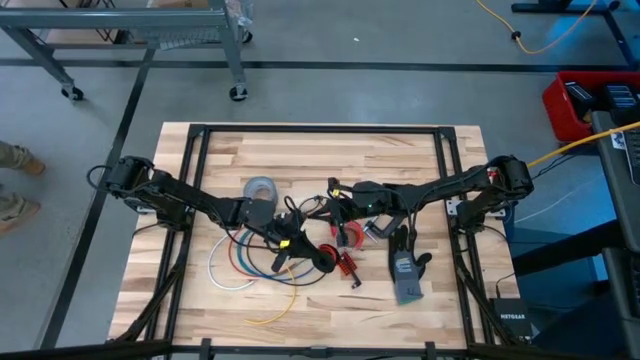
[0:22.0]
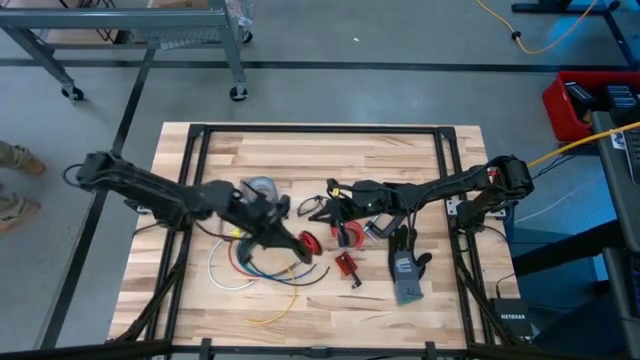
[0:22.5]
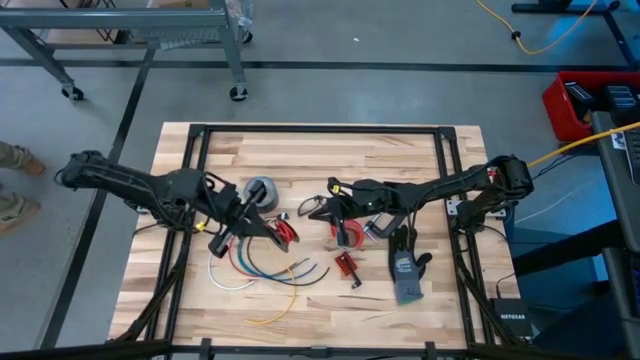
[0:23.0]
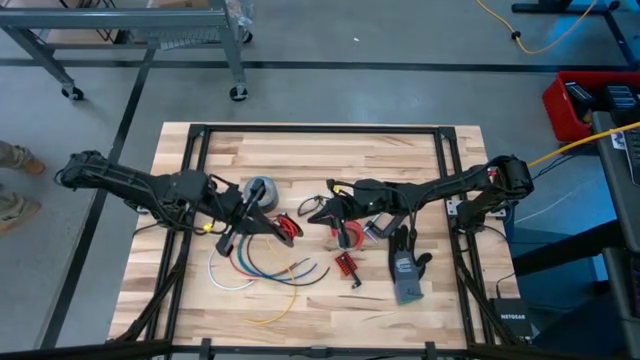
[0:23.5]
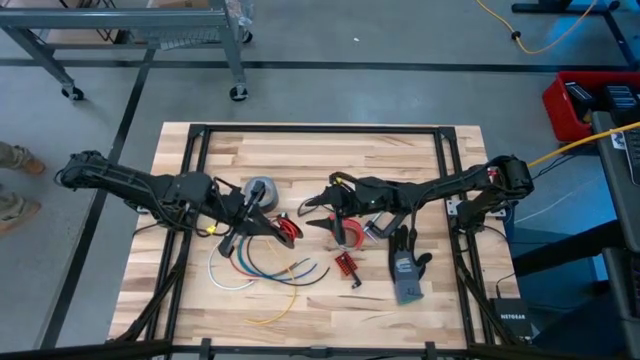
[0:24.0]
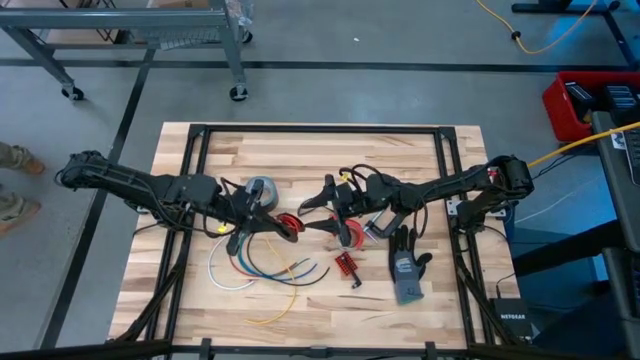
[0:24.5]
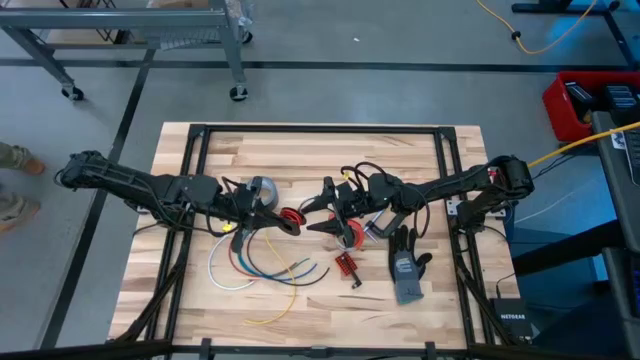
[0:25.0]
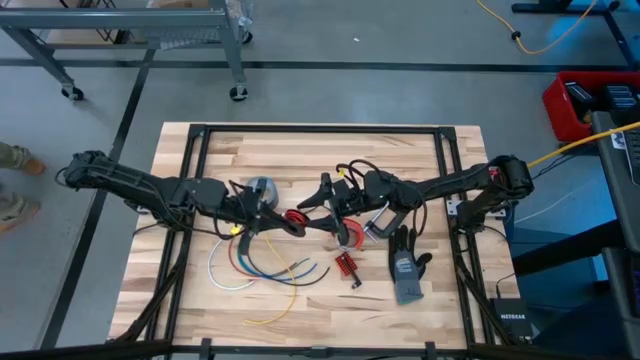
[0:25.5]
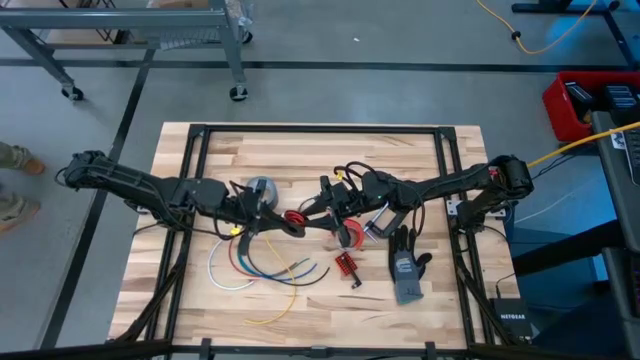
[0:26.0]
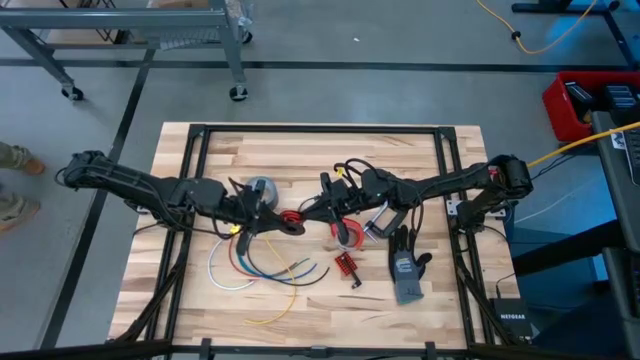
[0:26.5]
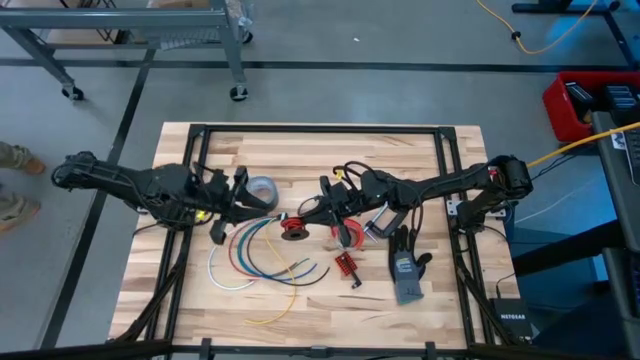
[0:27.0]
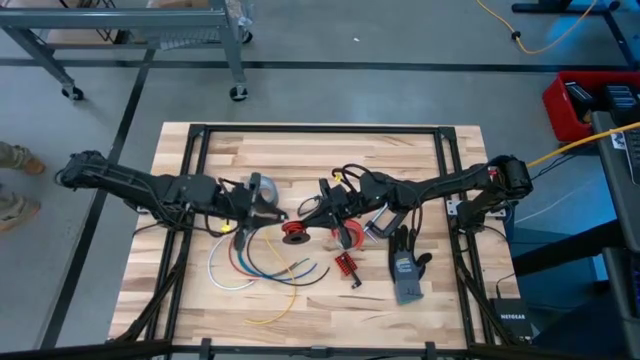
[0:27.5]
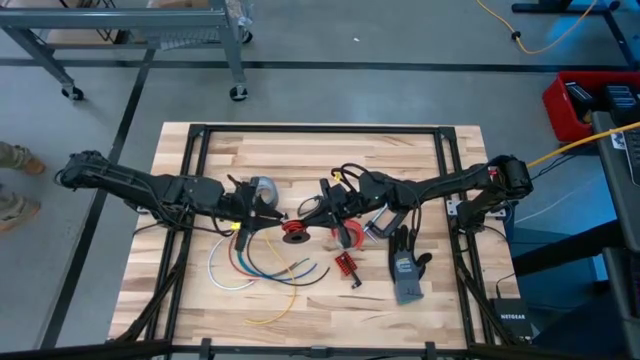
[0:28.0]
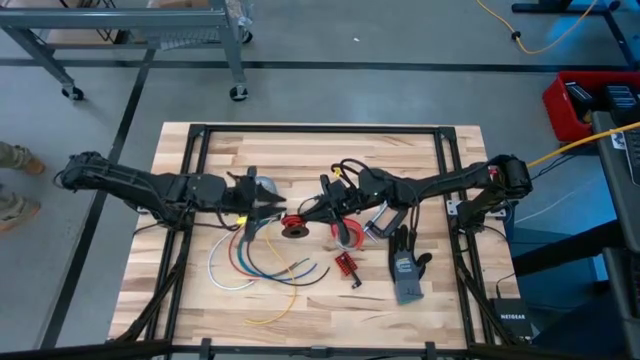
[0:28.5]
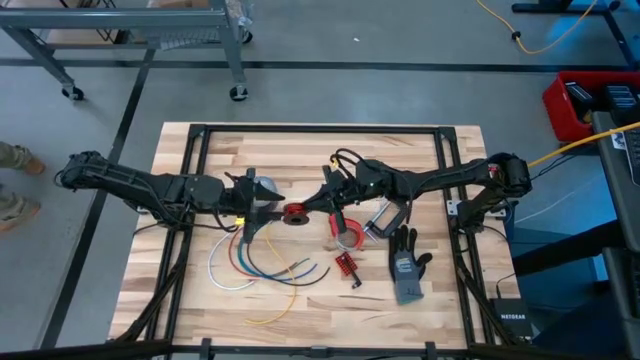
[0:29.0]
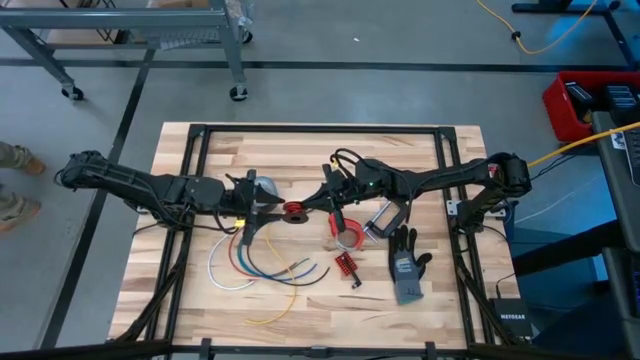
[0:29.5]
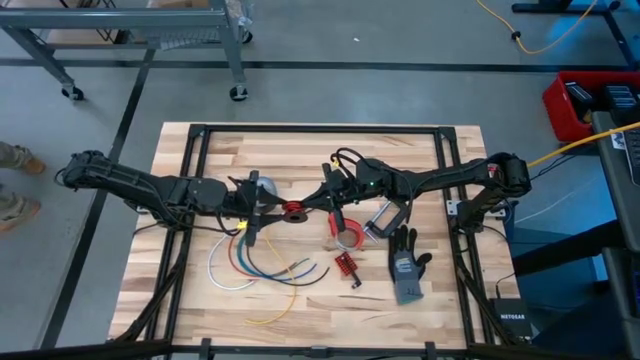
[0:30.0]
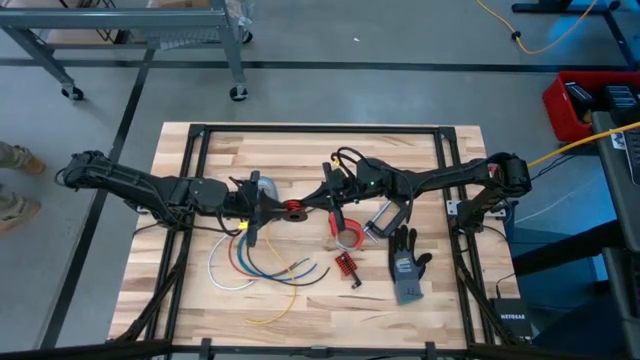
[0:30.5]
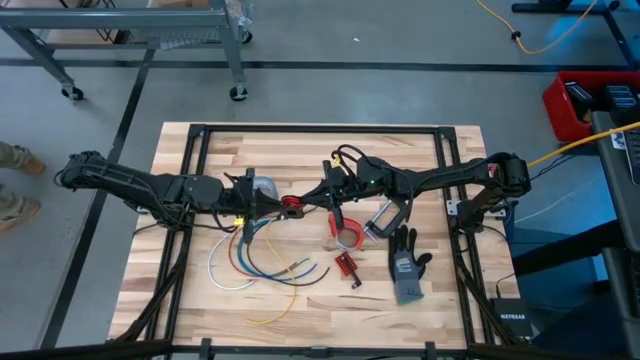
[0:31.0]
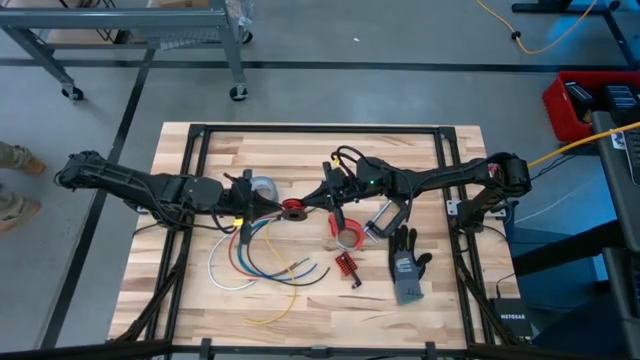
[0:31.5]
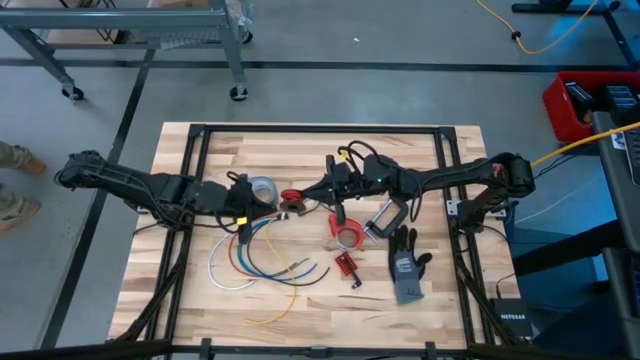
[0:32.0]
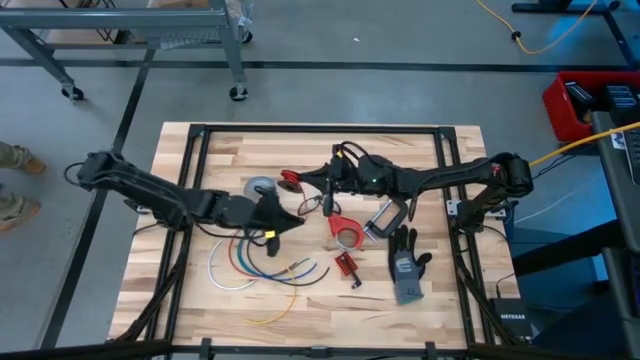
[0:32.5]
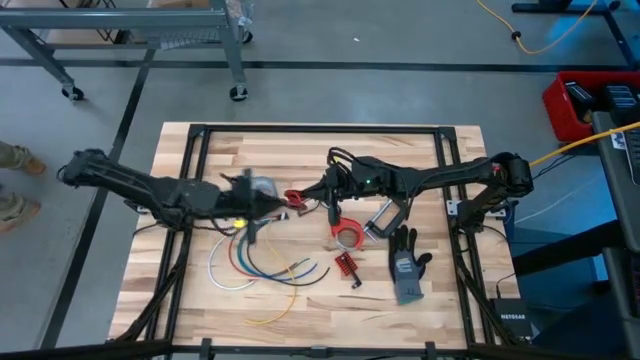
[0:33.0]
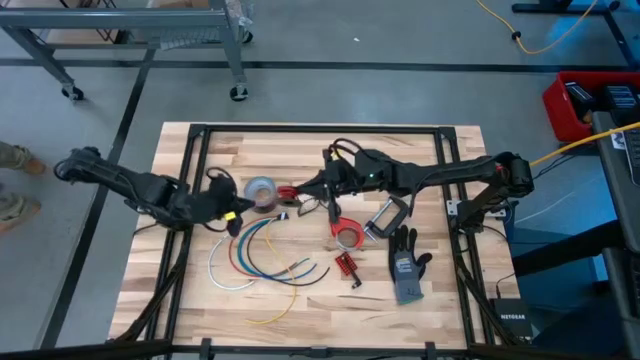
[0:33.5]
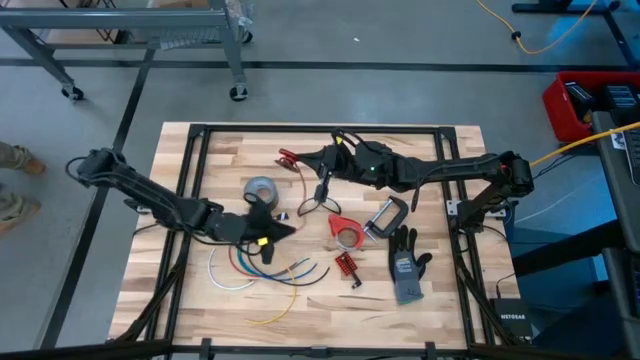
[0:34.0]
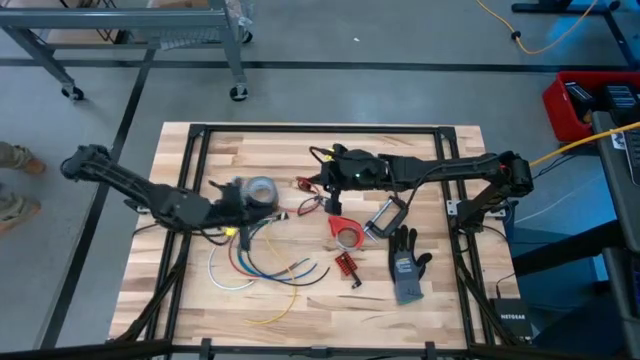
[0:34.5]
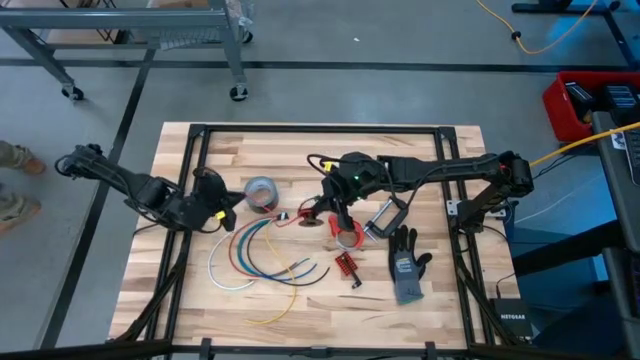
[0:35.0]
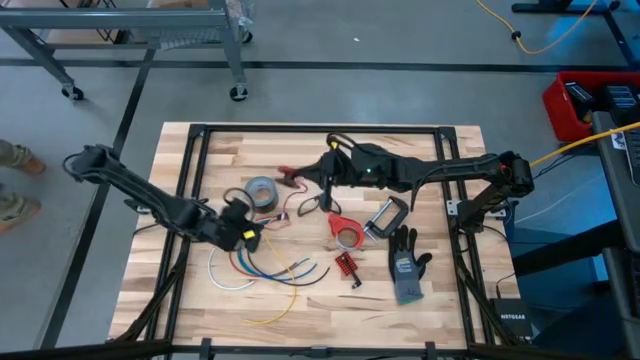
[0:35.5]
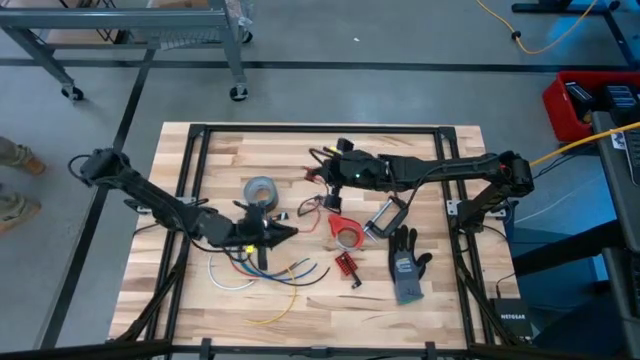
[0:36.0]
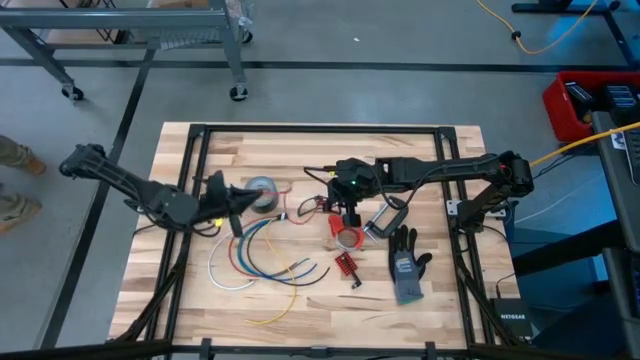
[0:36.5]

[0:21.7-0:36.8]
Task: Coil cords
Uncoil the red wire from the spool

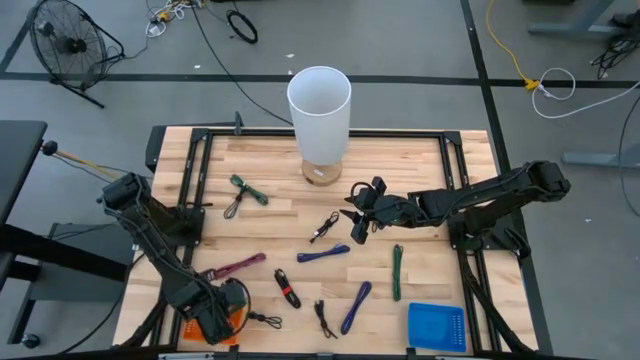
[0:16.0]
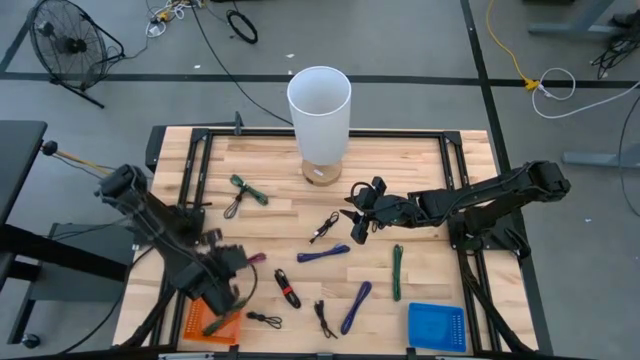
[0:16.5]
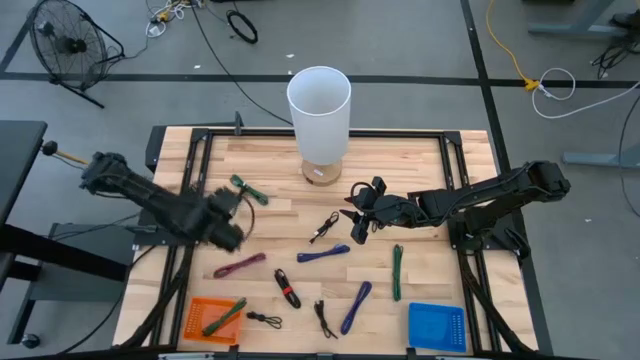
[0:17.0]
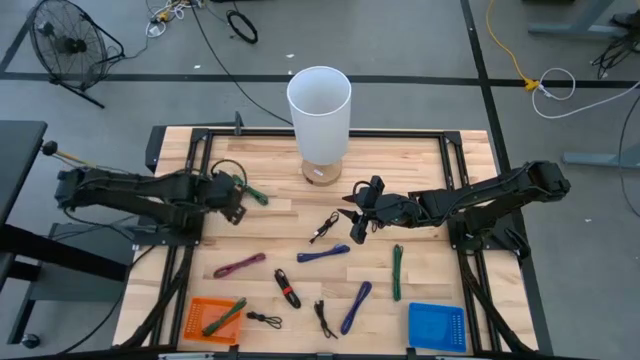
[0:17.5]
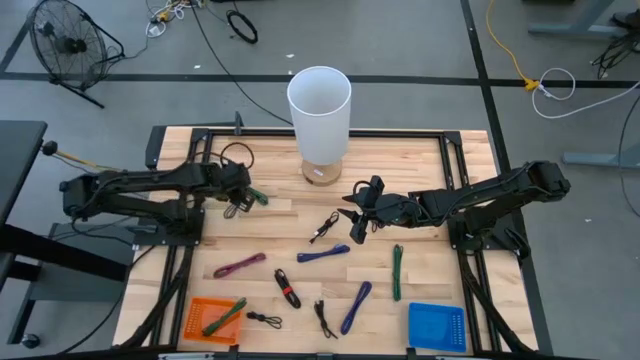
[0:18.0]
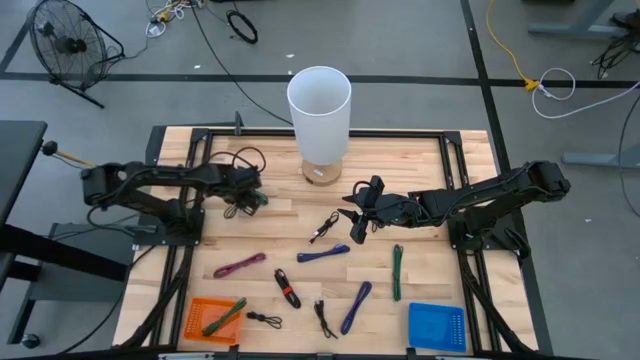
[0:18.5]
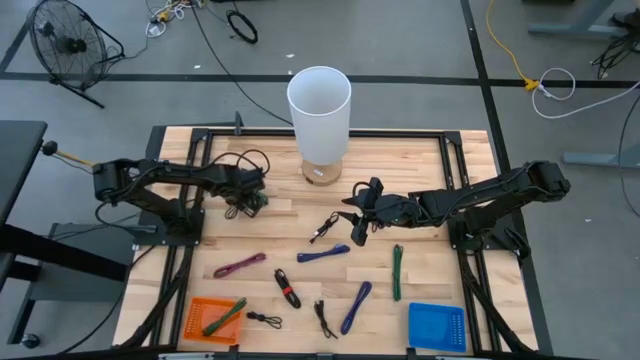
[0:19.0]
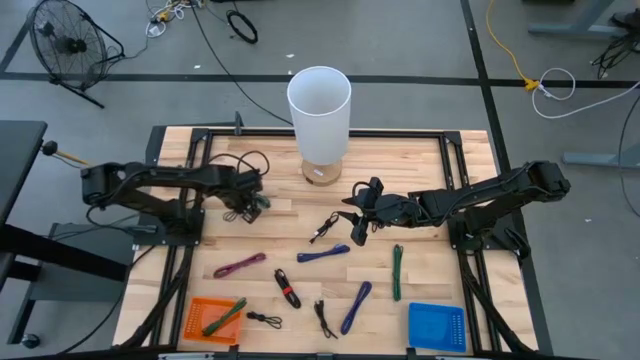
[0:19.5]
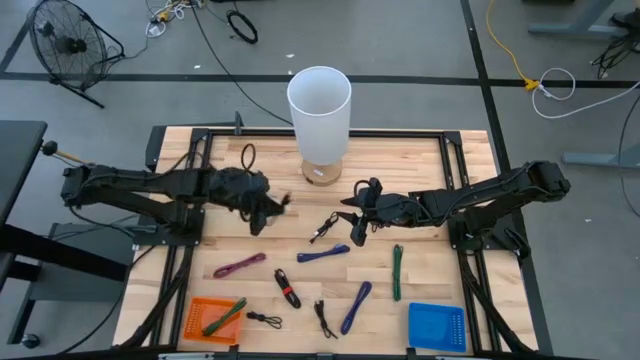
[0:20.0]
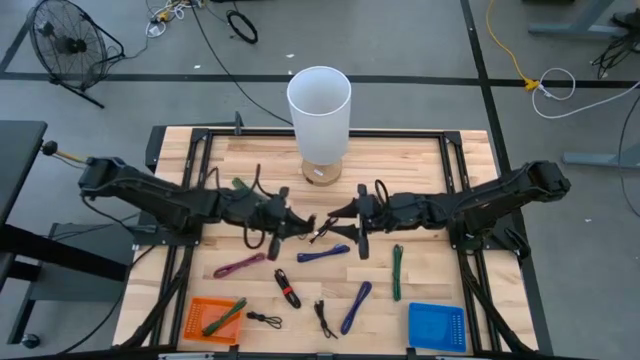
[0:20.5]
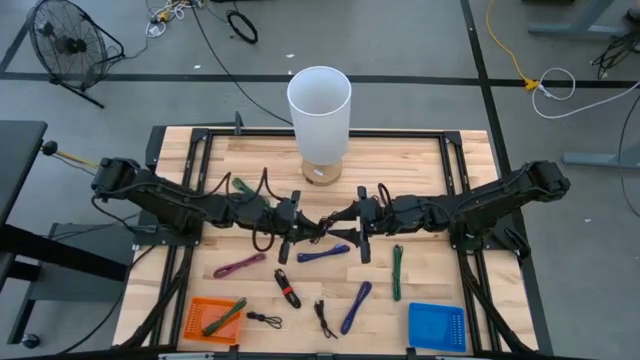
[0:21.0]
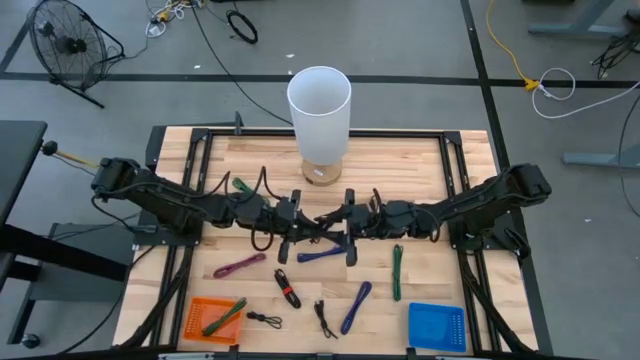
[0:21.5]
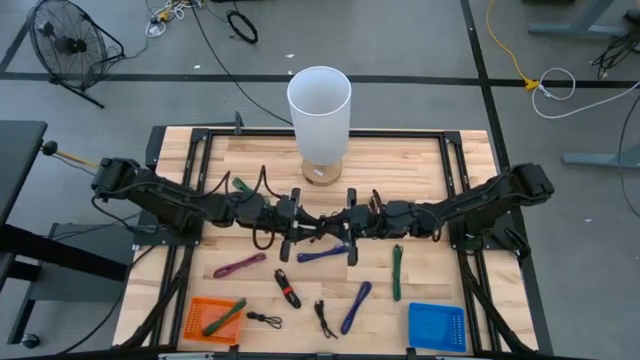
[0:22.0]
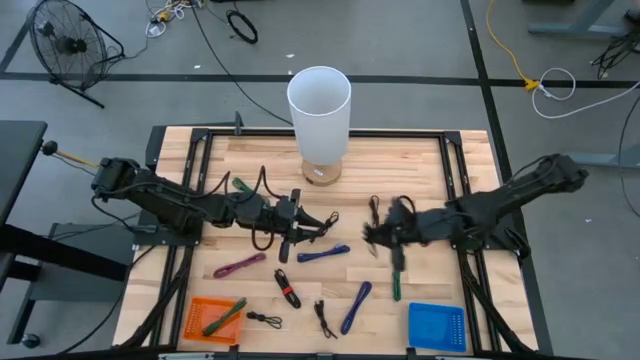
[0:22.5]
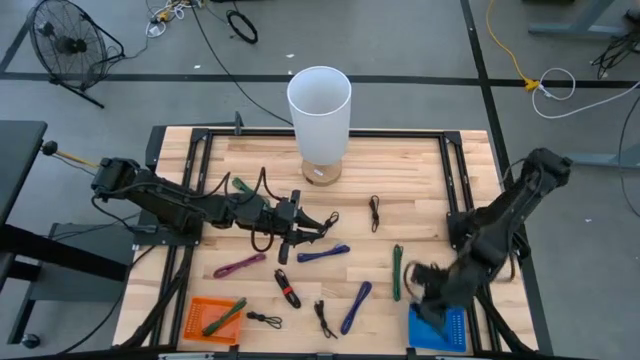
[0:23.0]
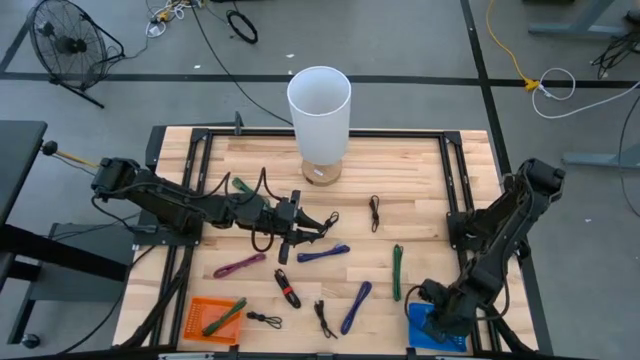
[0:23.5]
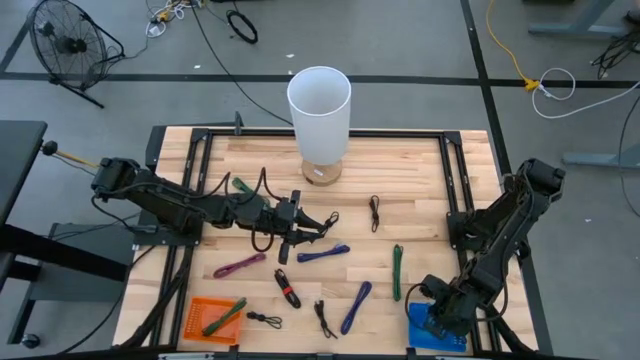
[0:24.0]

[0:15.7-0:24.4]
Task: Pick & Place USB Port
Put the black charger cable into the blue bin
